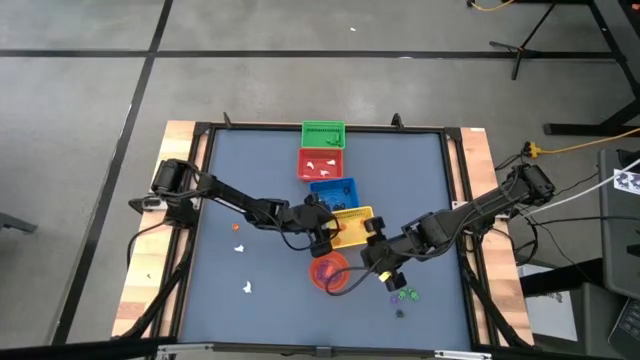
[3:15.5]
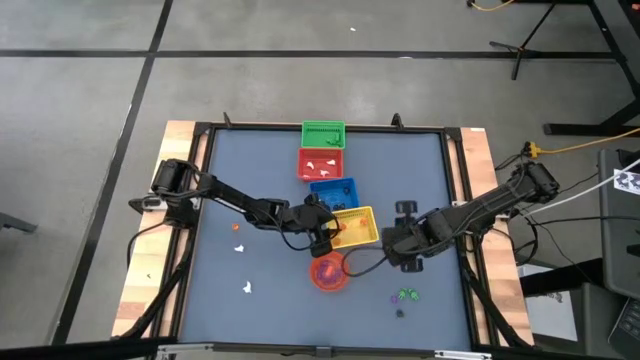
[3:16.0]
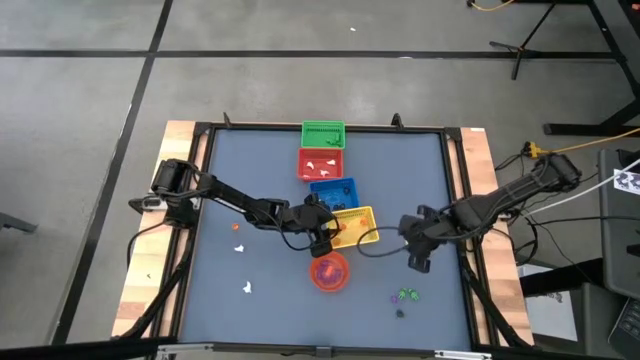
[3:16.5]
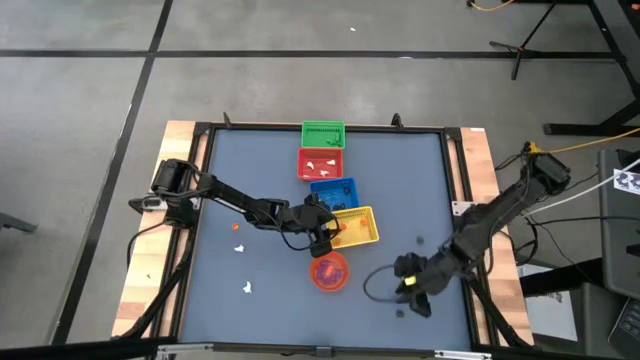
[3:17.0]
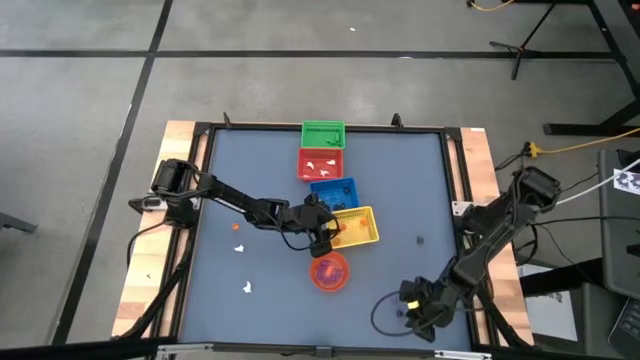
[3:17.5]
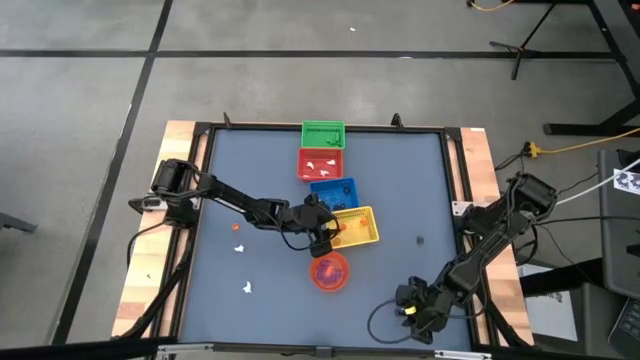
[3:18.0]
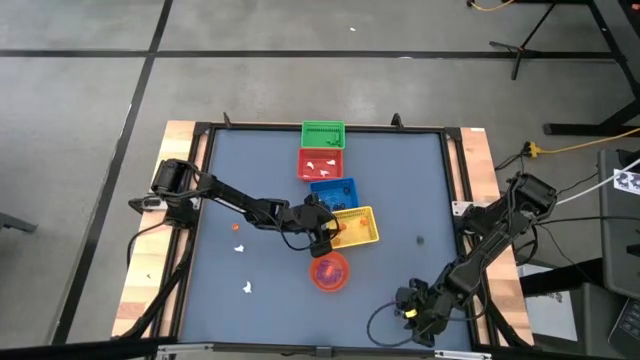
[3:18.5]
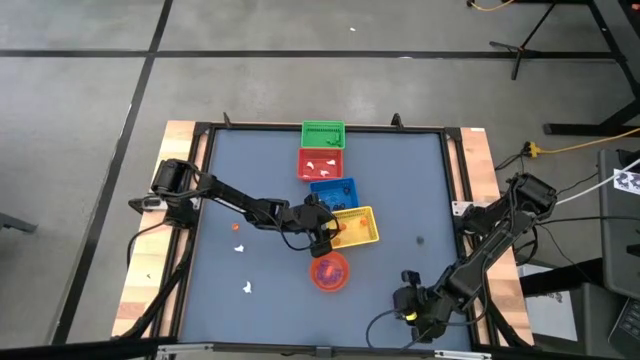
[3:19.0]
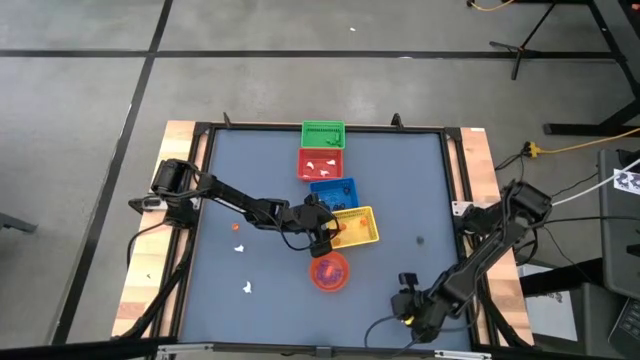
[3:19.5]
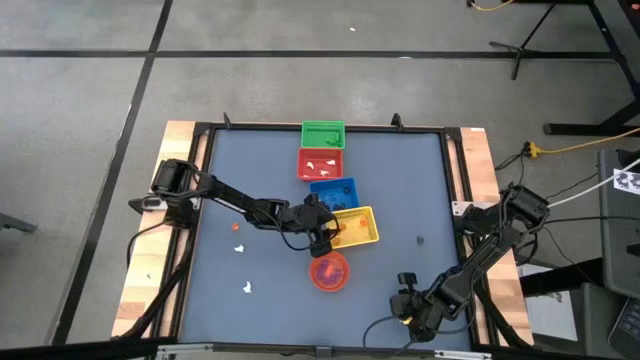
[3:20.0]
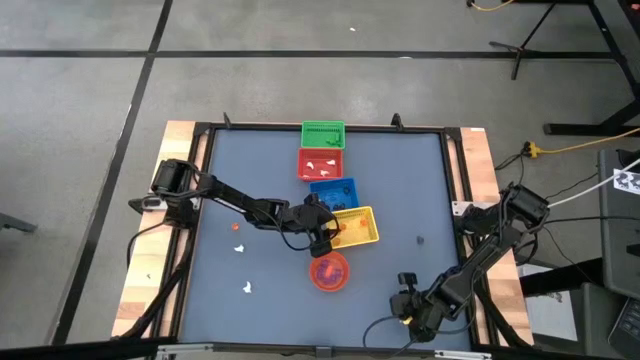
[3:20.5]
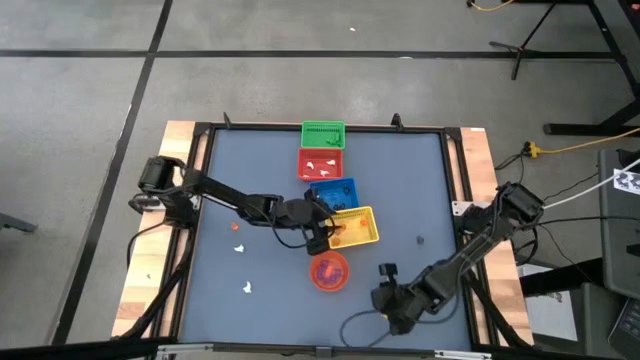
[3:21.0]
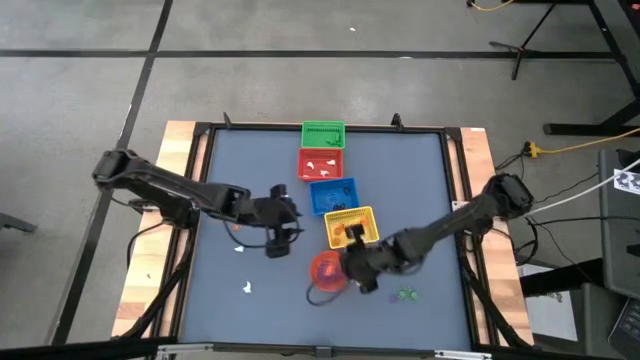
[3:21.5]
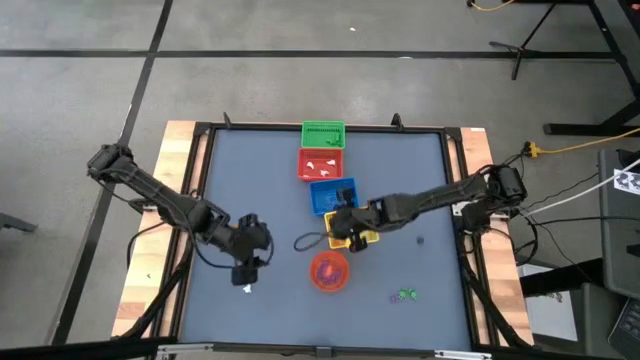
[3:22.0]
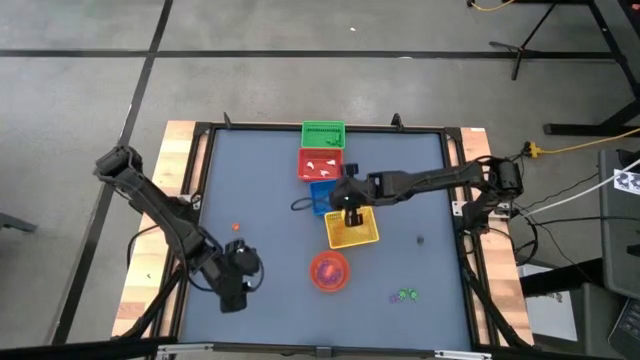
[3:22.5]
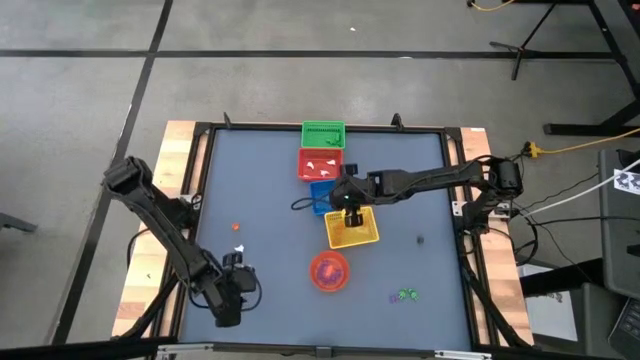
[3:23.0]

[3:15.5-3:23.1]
Task: Sort Halloween decoration
Put the black skull toy into the blue bin

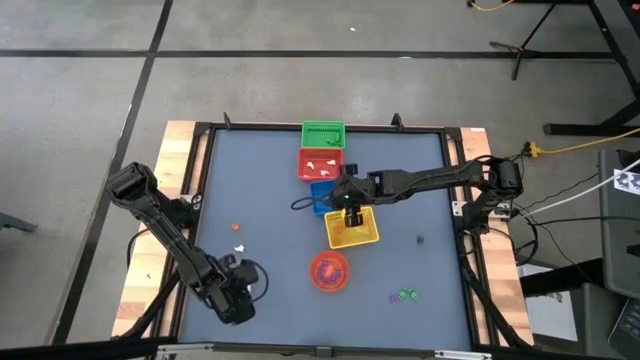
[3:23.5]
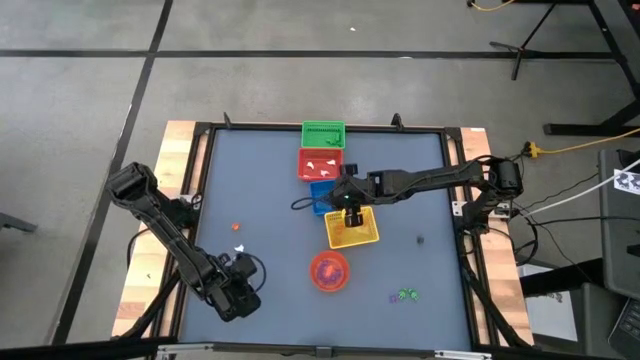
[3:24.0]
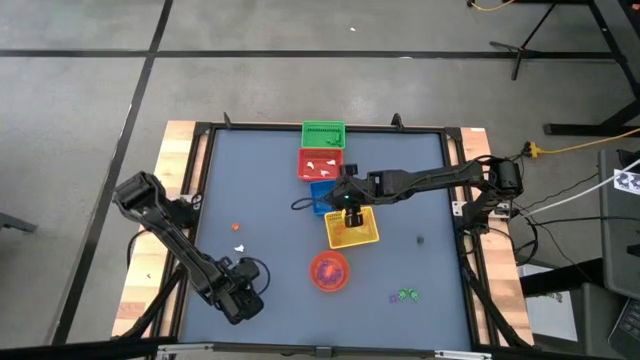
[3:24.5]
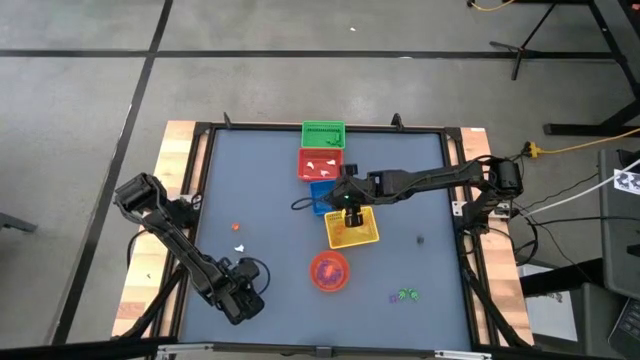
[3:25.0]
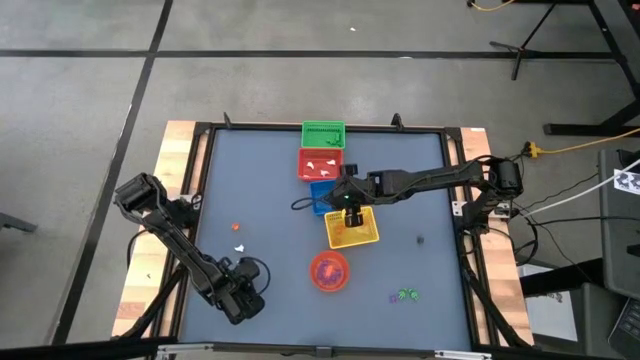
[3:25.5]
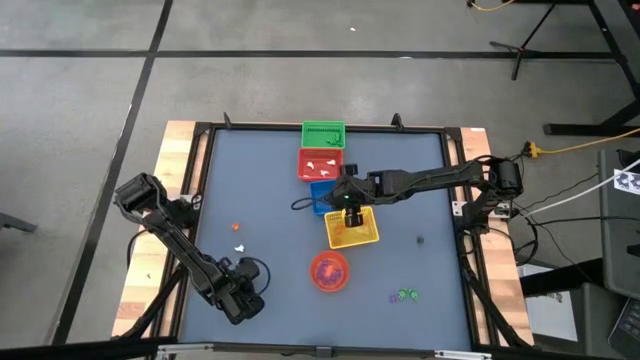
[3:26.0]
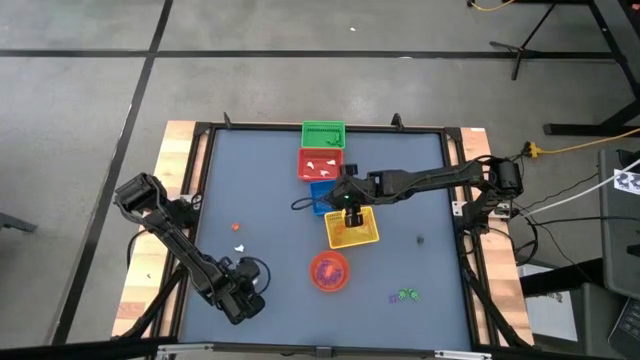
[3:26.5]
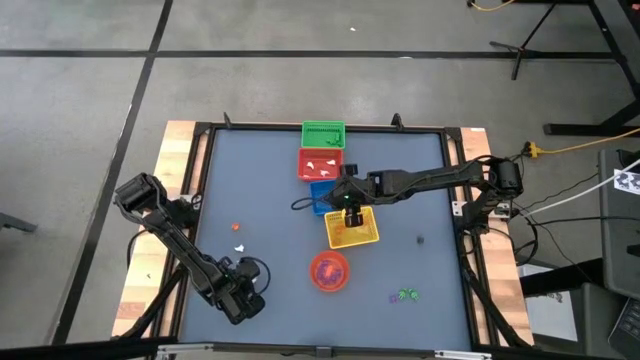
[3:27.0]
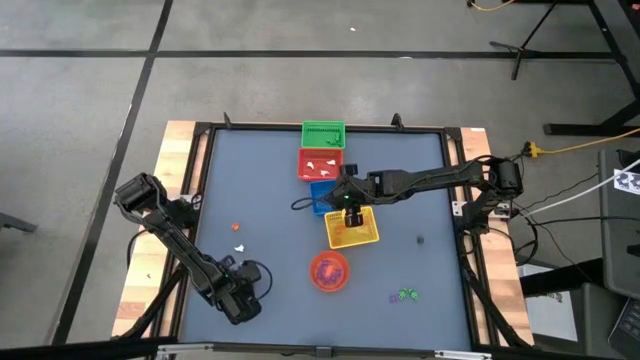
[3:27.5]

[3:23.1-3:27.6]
Put the white ghost toy into the red bin

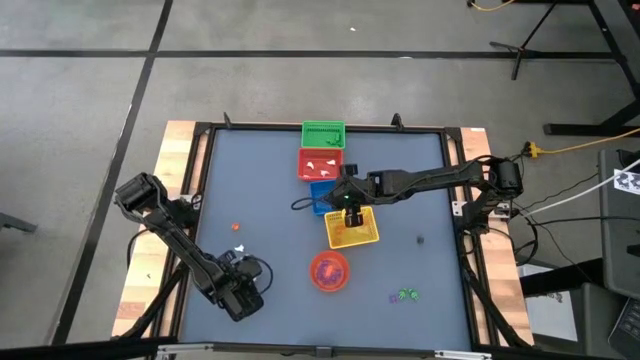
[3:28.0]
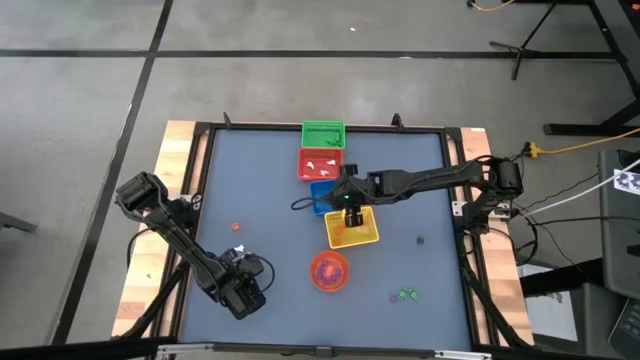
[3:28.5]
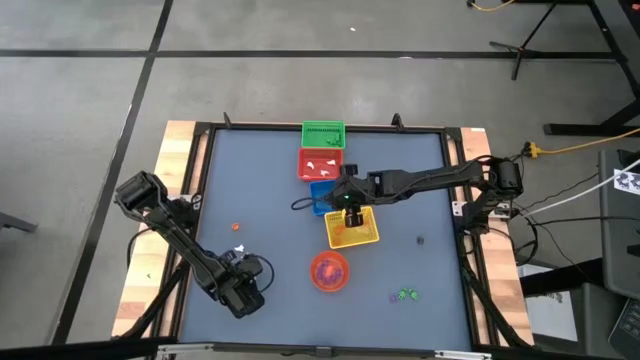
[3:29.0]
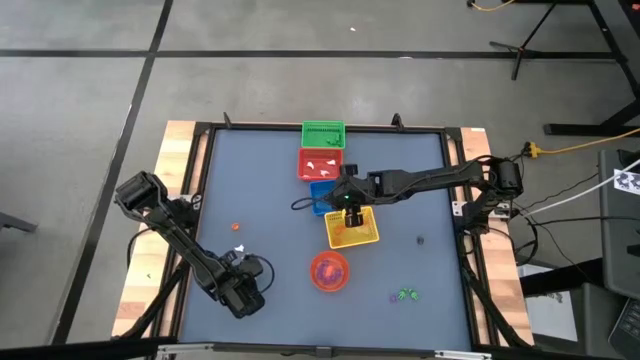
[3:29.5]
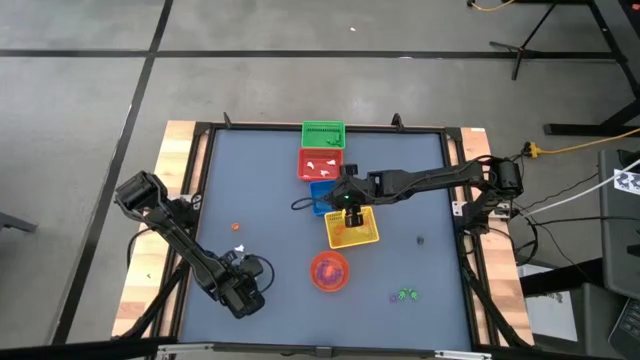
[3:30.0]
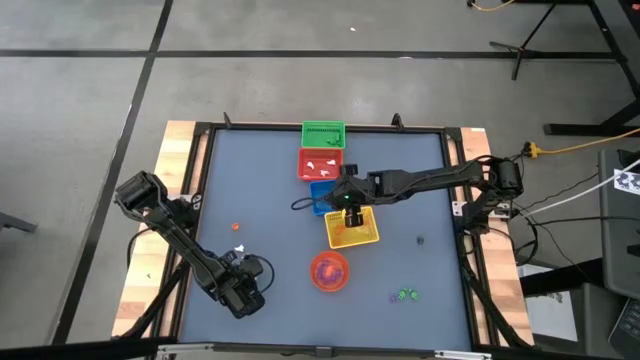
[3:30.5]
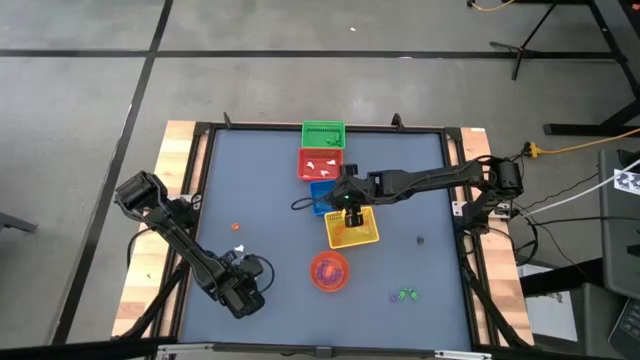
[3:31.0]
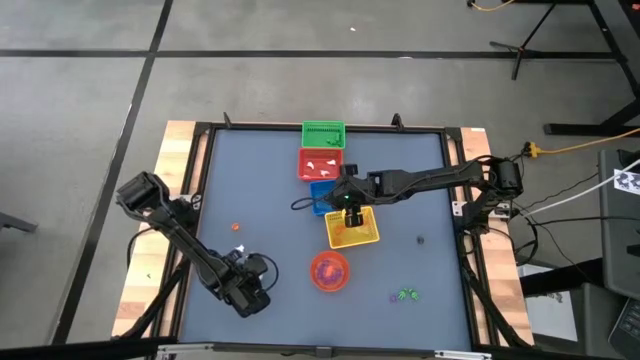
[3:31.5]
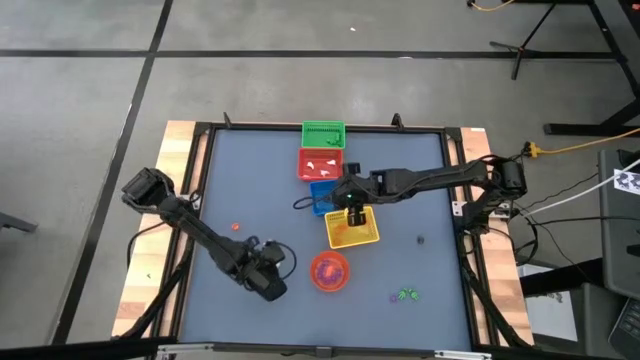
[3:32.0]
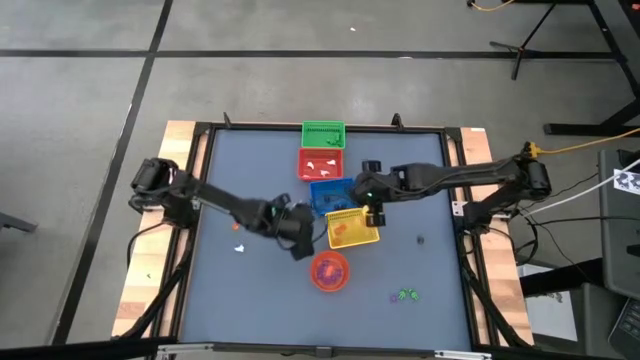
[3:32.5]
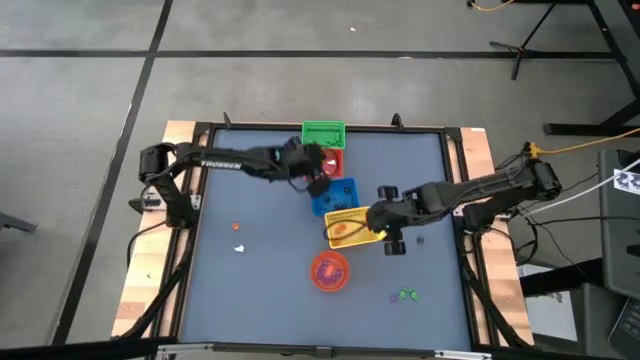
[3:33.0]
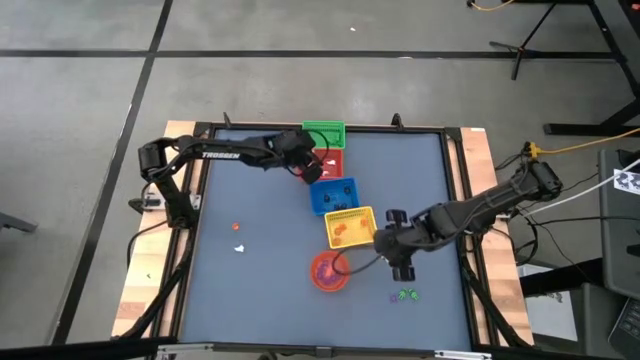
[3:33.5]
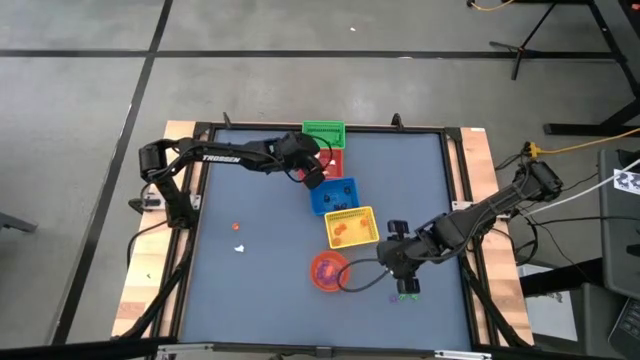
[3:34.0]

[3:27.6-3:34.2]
Put the white ghost toy into the red bin

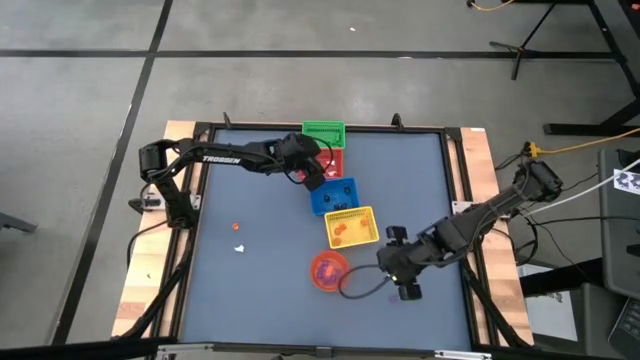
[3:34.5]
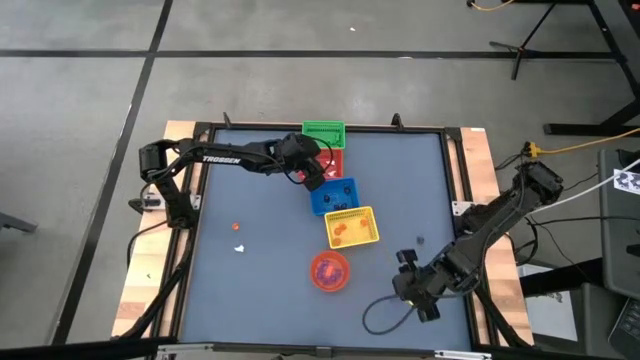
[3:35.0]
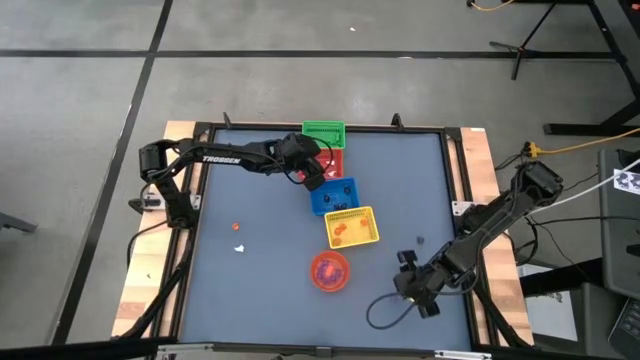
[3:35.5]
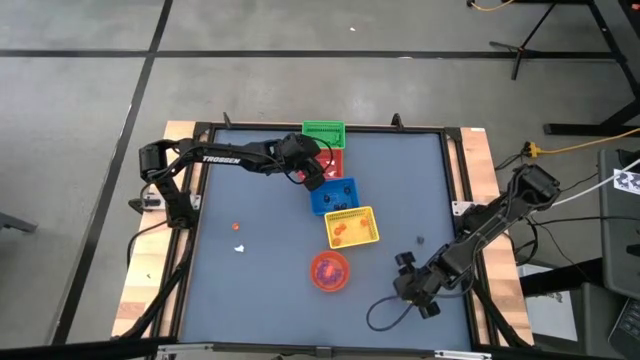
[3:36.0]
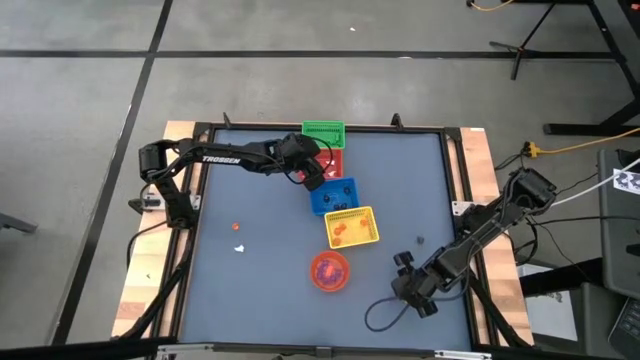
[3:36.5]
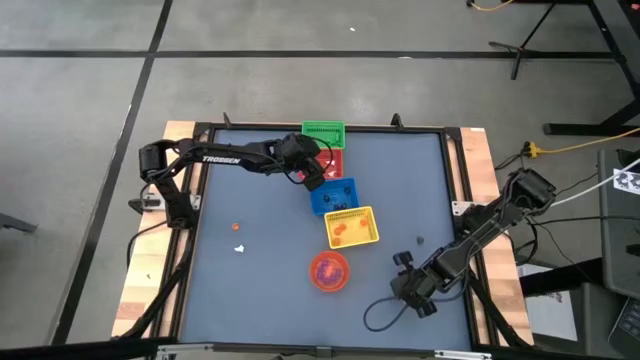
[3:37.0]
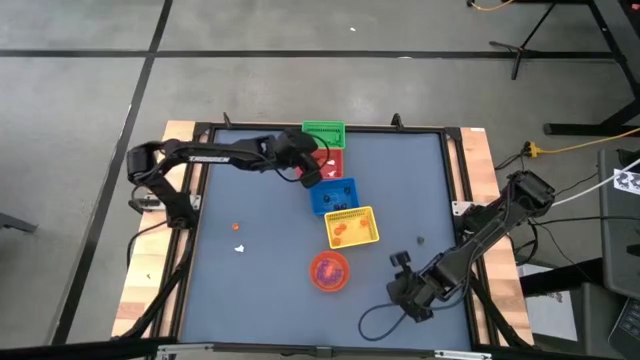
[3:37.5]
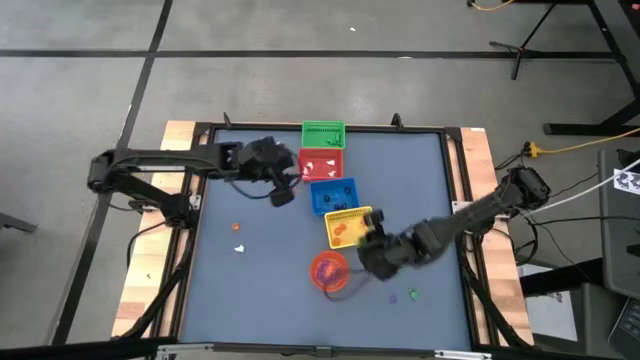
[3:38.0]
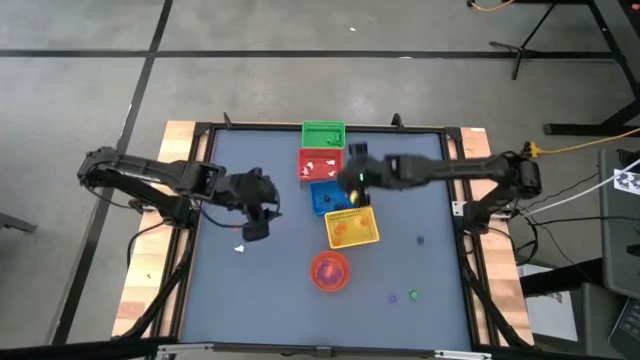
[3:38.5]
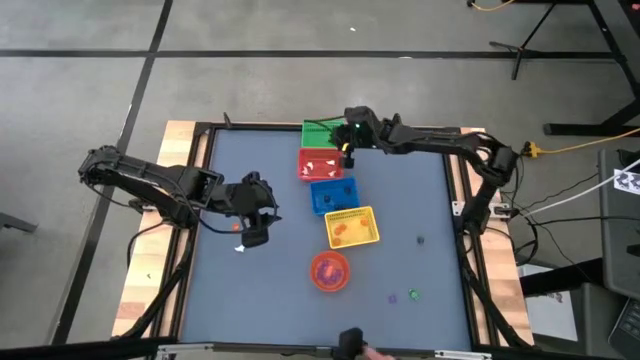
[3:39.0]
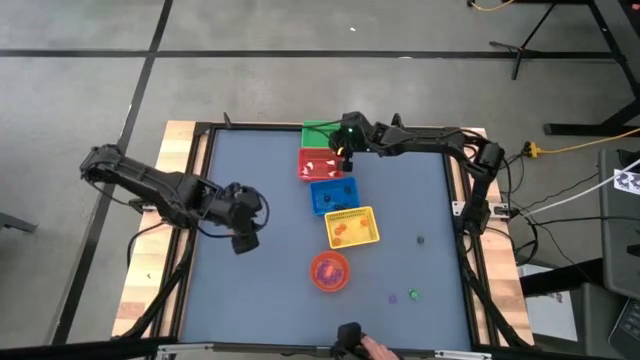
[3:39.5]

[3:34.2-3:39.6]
Put the green skeleton toy into the green bin
